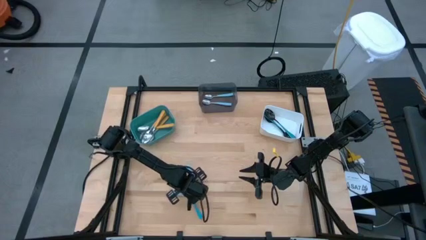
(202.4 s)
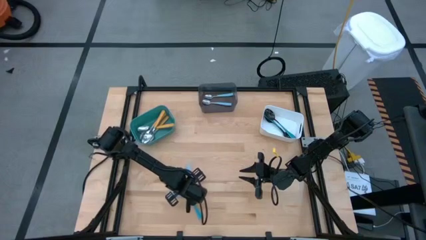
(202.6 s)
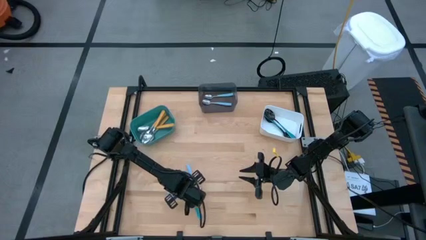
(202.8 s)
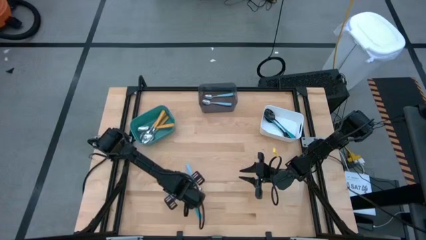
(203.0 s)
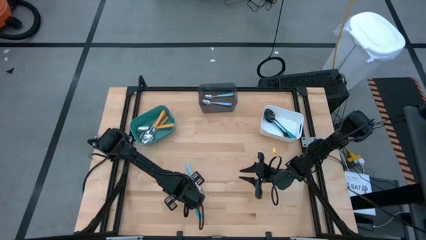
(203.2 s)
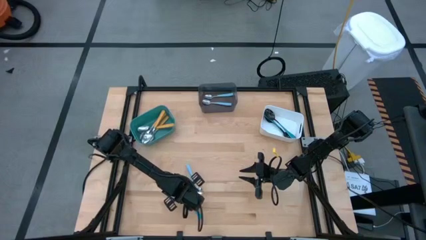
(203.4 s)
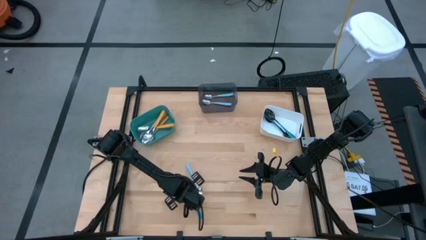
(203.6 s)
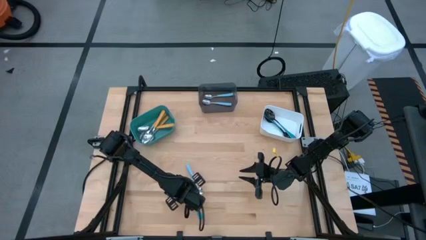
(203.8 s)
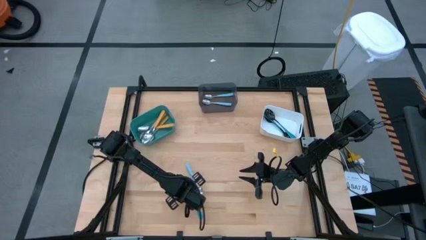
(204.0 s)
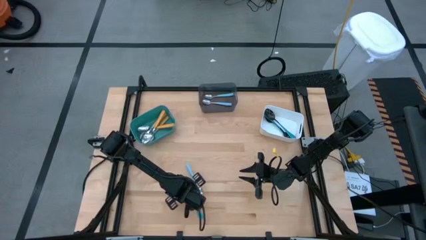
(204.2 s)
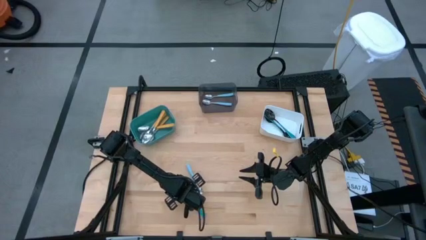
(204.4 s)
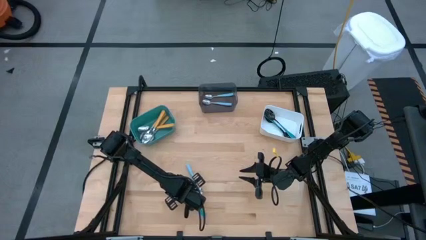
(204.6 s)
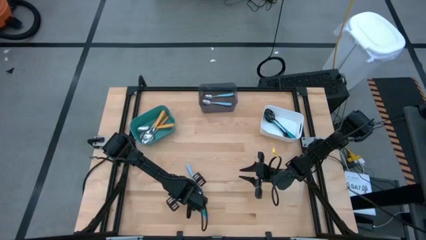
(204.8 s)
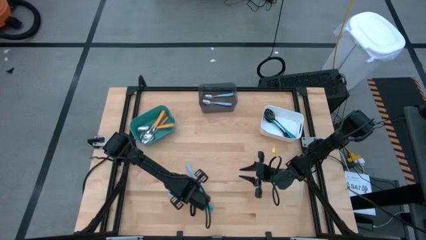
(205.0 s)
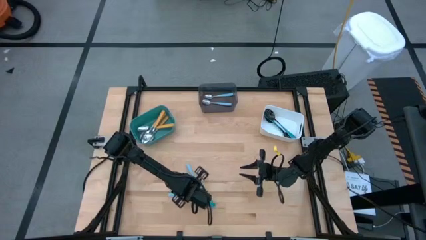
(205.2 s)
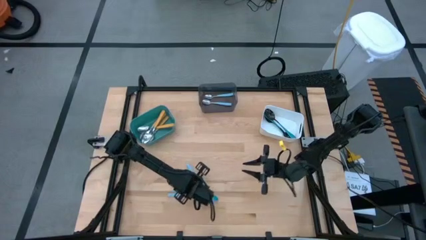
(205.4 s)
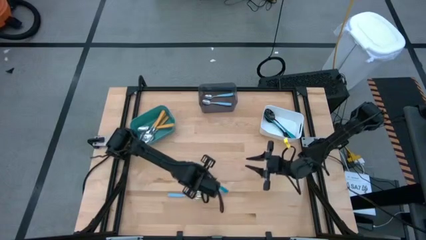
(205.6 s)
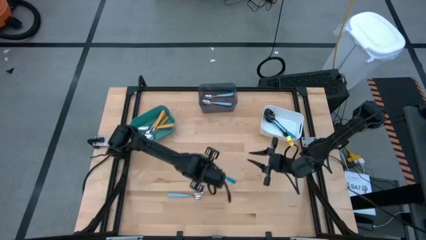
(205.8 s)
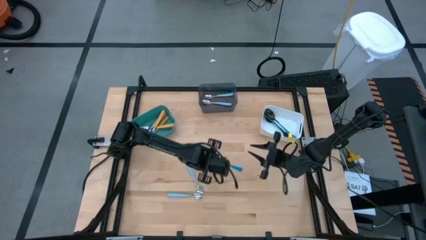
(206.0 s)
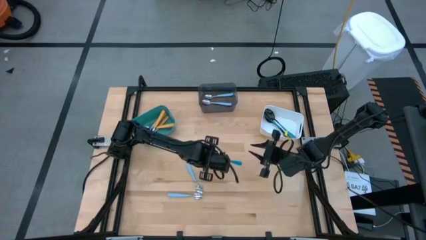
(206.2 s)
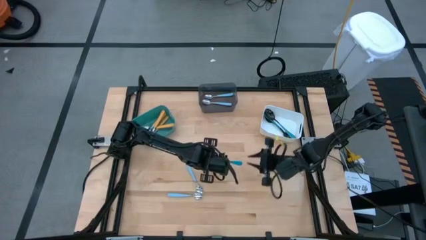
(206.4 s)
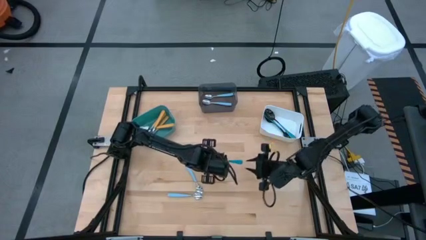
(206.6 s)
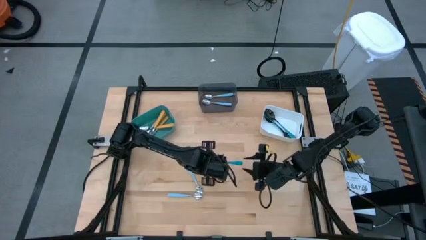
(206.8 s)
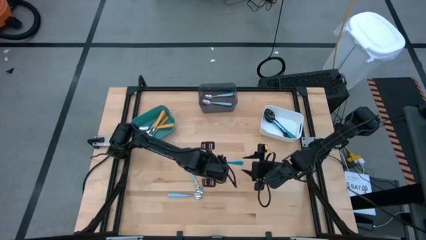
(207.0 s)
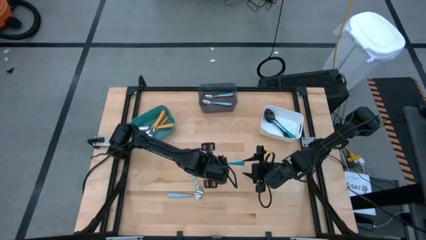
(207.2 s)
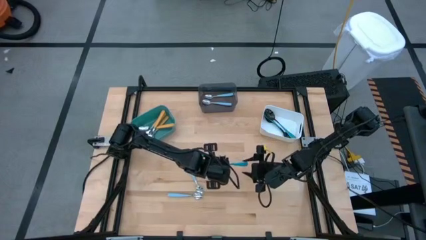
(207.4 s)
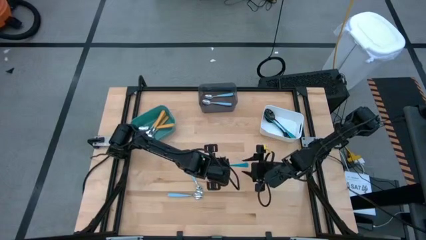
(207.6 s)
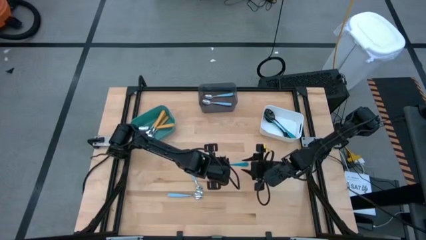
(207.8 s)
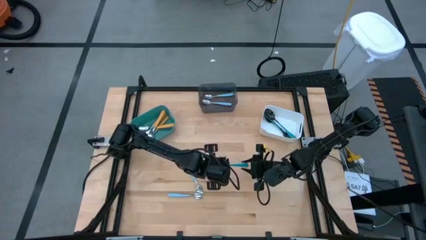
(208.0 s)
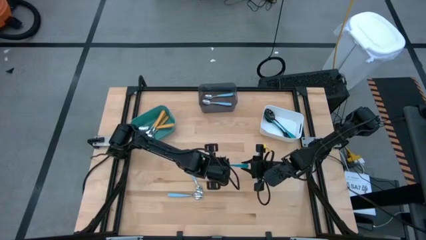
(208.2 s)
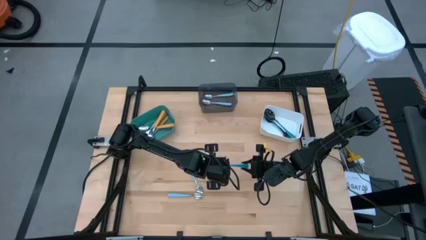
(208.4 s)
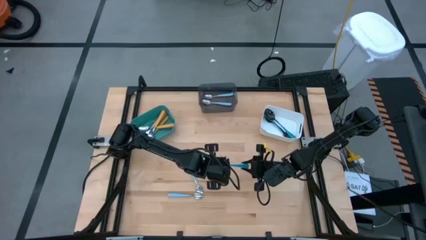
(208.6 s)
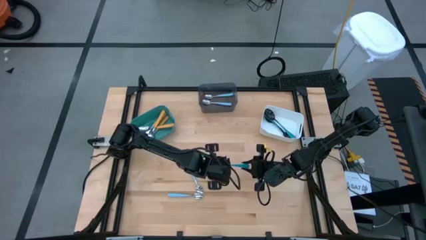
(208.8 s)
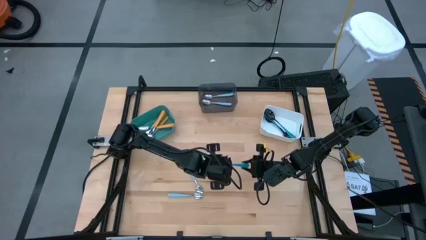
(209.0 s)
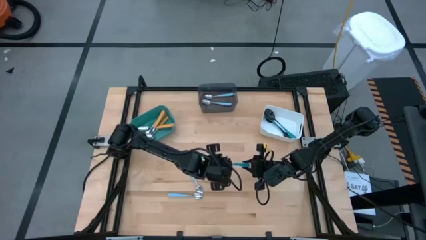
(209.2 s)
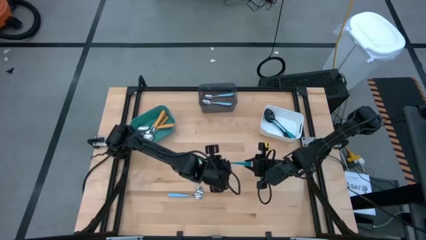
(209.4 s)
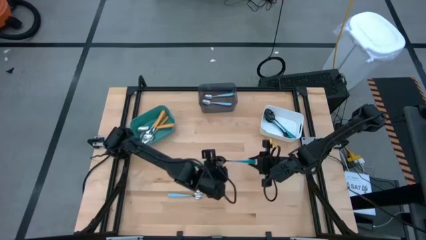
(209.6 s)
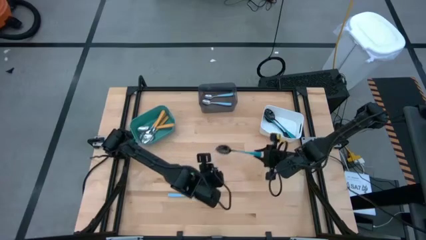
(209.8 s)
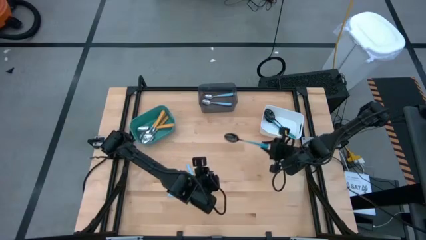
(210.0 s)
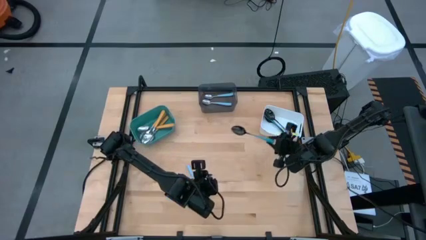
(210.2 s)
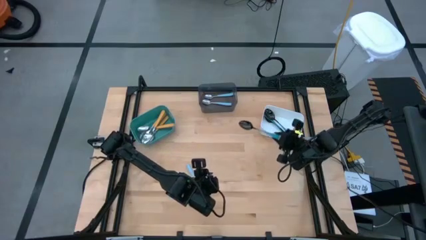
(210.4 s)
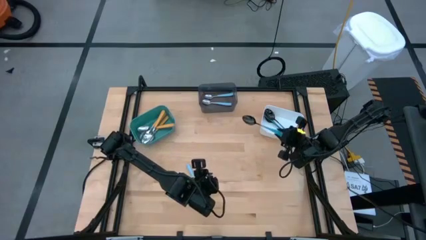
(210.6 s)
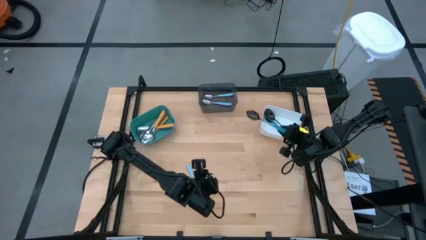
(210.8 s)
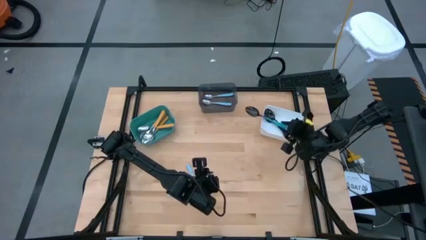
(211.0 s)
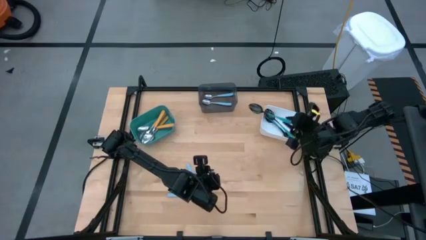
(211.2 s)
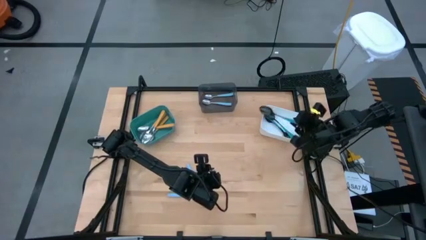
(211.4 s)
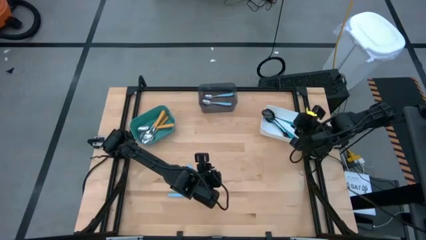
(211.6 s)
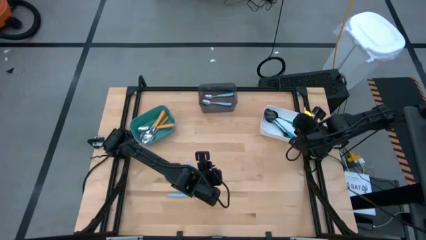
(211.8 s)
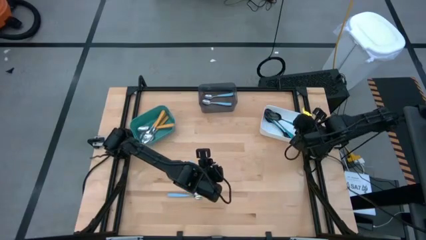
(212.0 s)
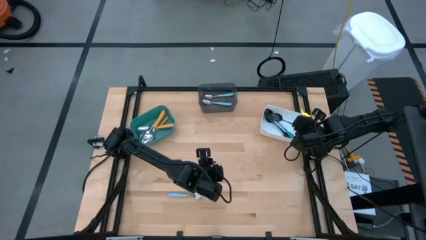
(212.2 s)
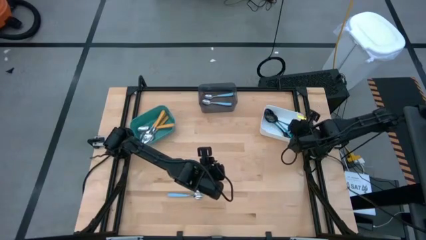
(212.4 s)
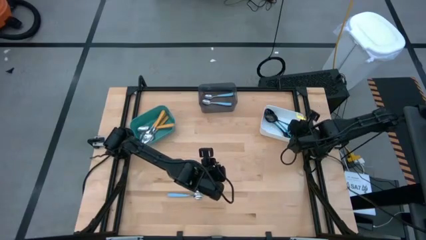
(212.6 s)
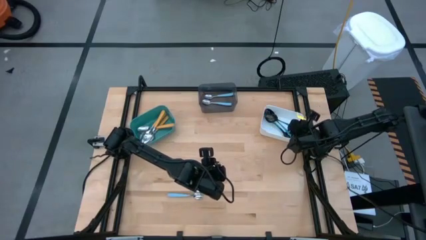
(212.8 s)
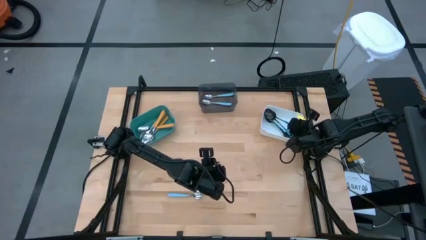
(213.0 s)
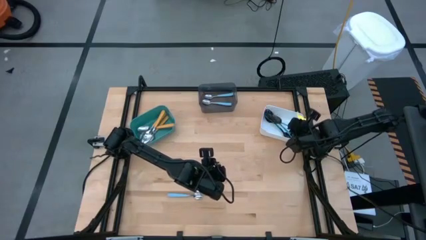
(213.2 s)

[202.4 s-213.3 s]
Task: Sort silverware by color (type)
Put the blue spoon into the white bin
